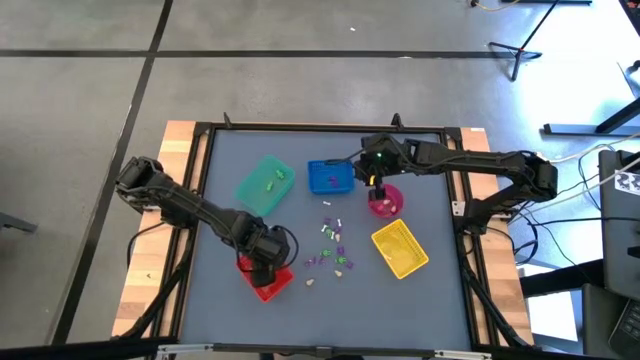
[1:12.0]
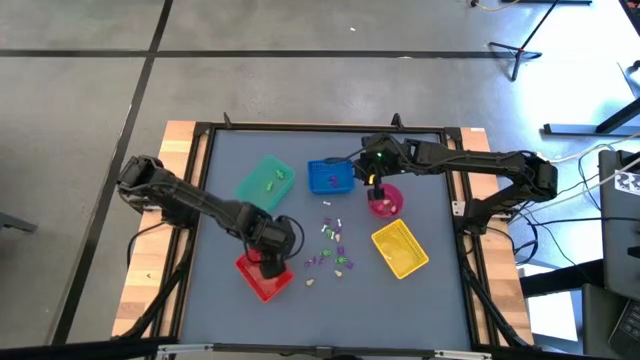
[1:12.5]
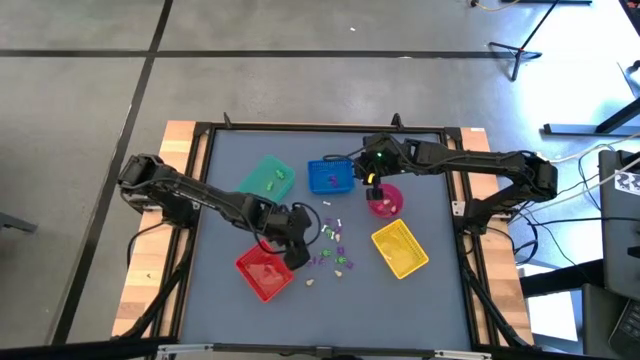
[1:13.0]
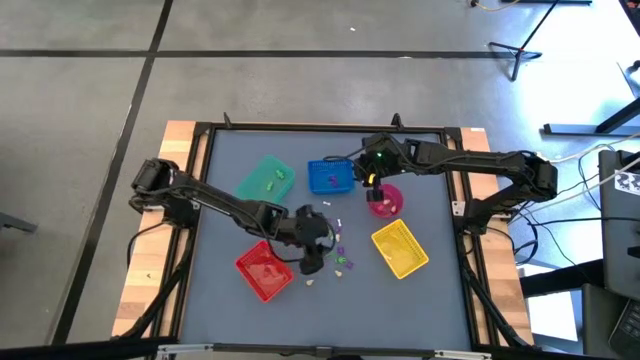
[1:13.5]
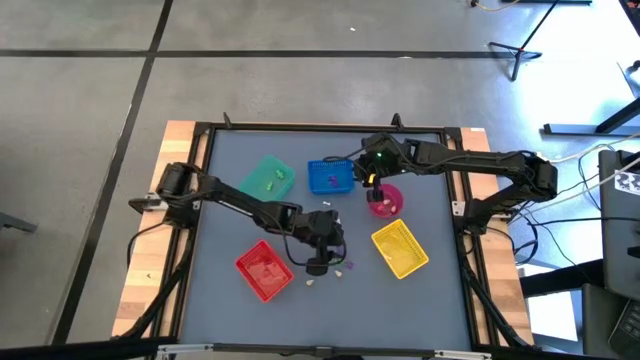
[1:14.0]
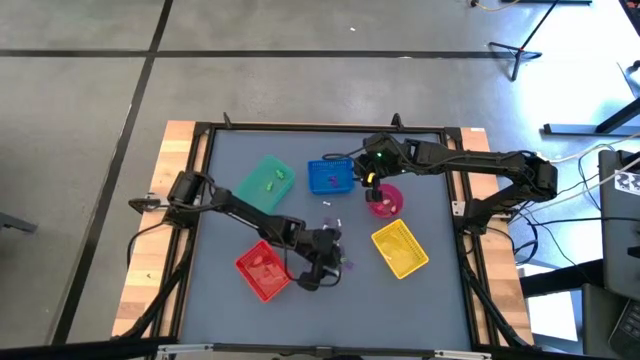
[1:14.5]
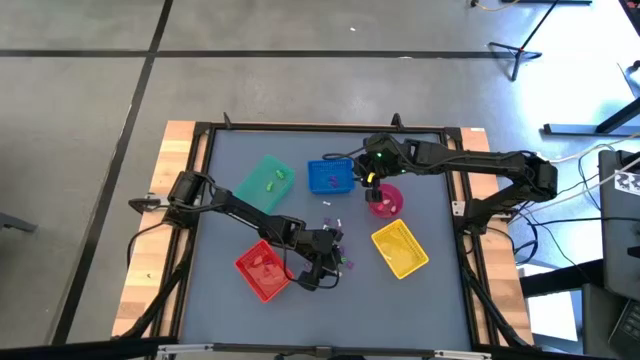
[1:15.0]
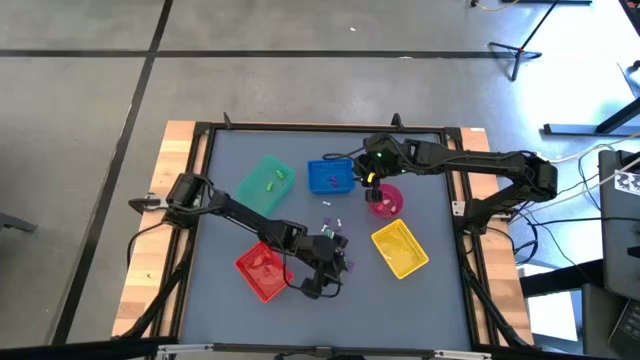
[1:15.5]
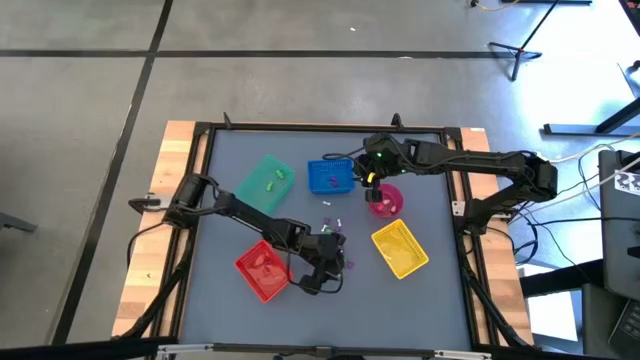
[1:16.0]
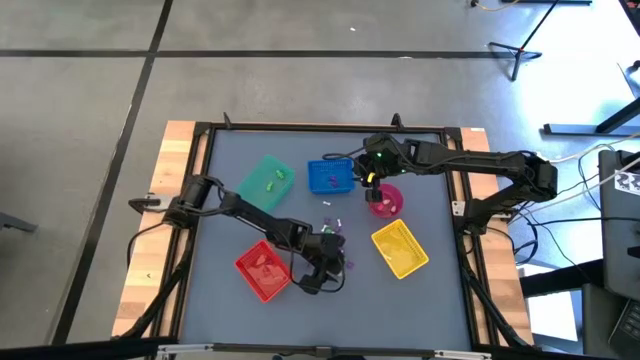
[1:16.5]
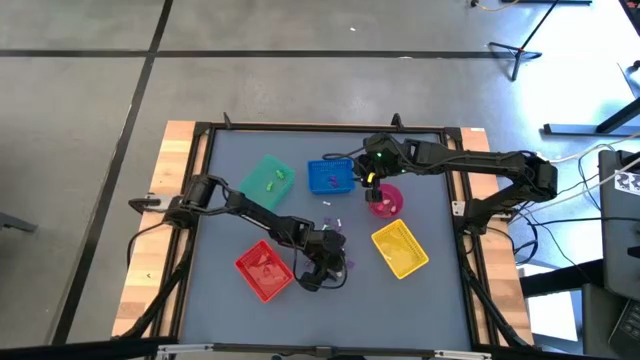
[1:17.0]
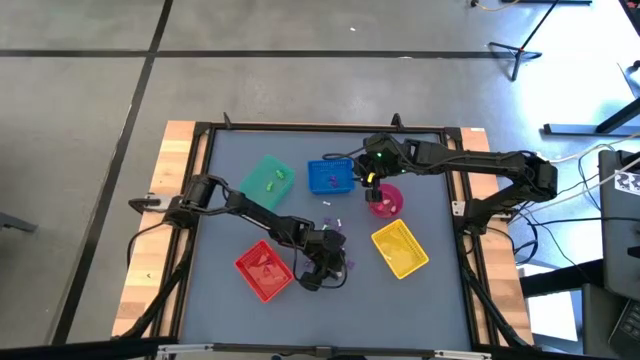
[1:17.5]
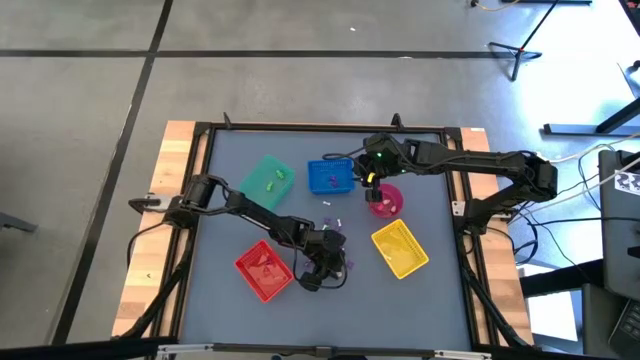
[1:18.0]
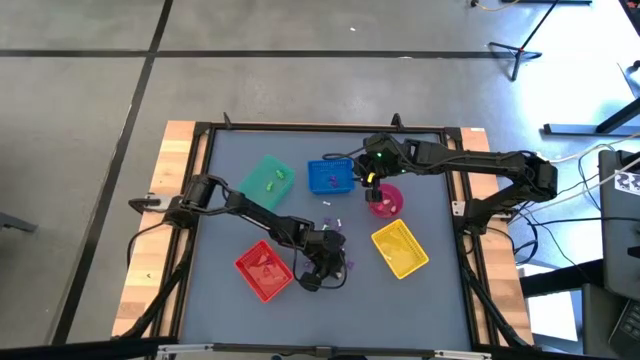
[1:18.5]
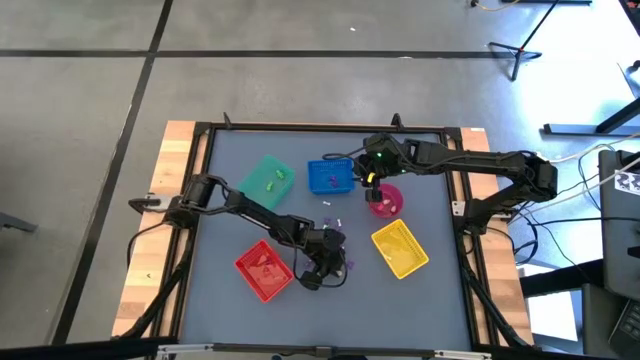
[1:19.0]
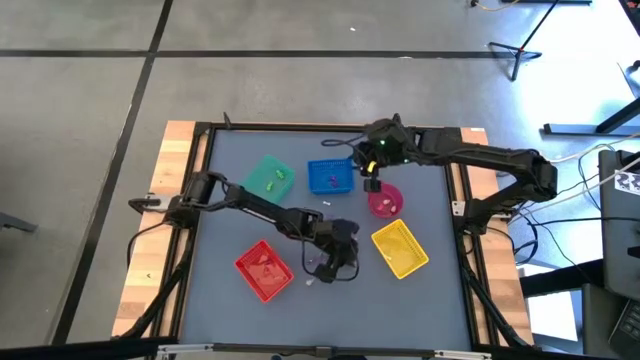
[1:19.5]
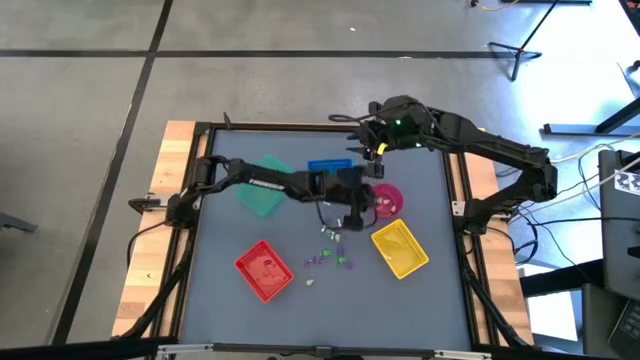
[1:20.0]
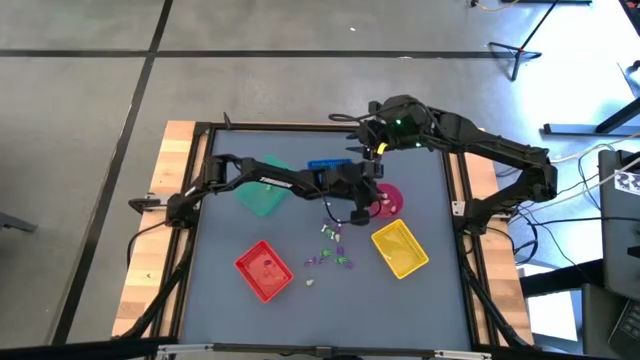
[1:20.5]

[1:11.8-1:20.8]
Task: Sort Halloween decoration
Put the yellow skull toy into the red bin

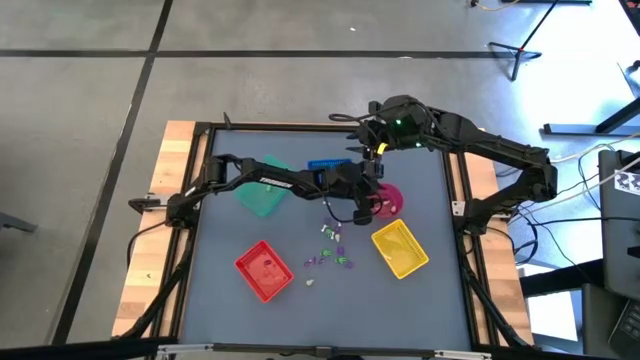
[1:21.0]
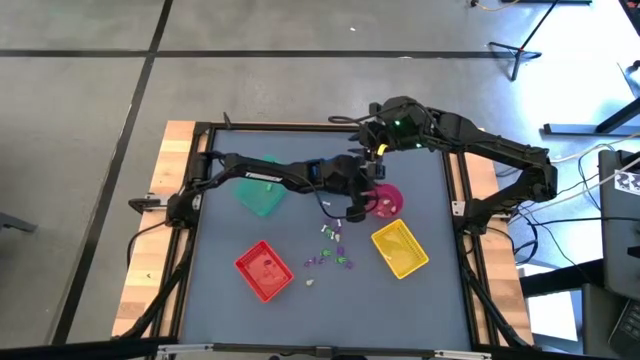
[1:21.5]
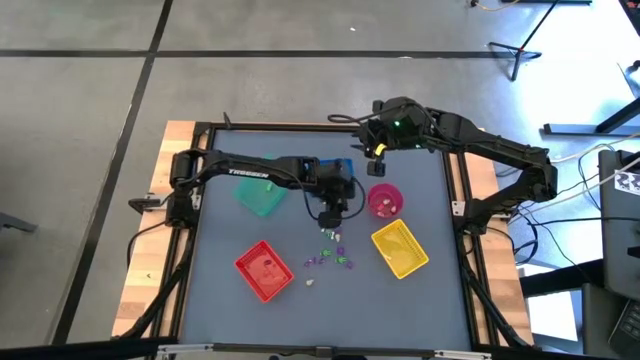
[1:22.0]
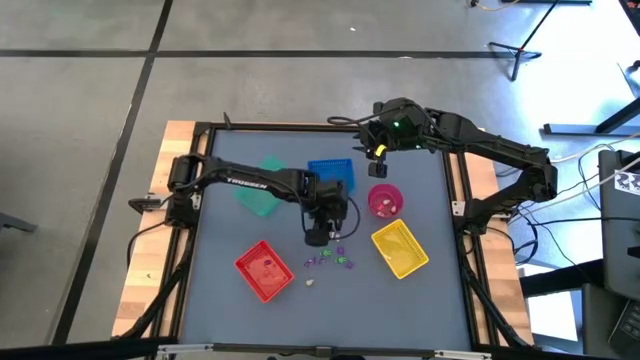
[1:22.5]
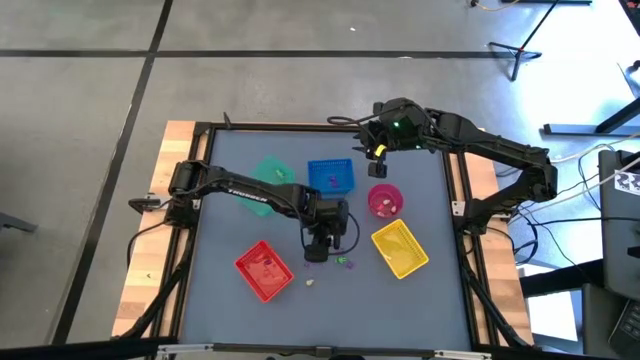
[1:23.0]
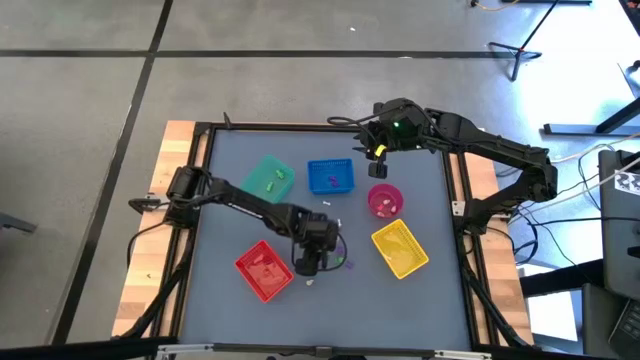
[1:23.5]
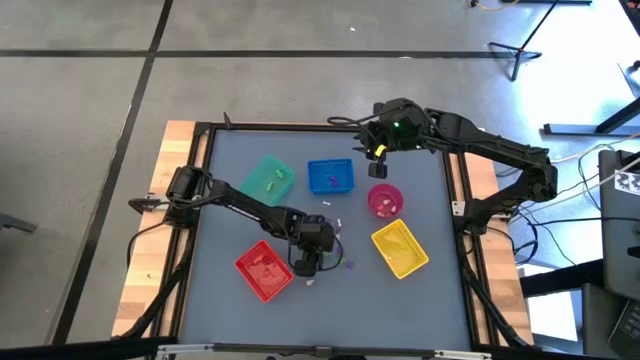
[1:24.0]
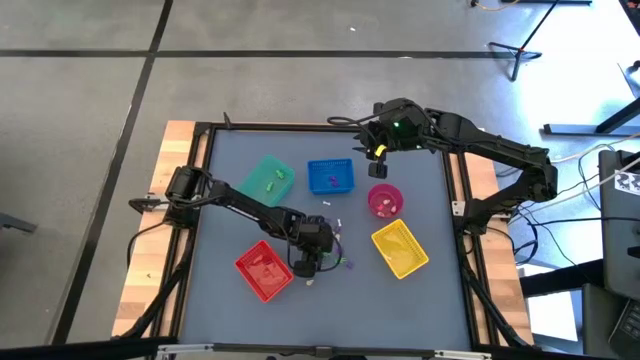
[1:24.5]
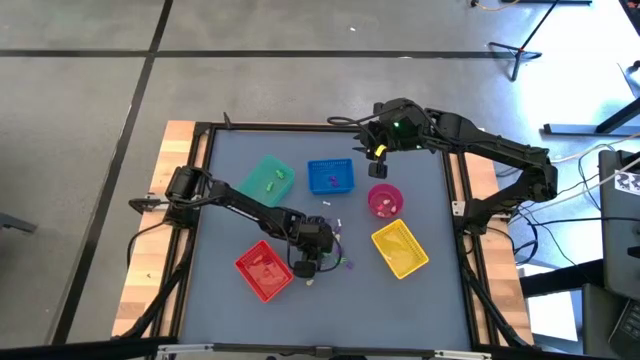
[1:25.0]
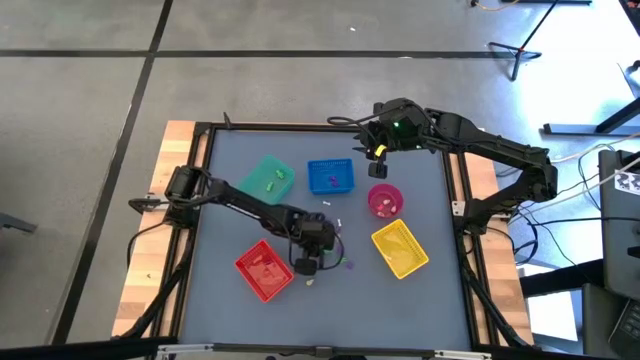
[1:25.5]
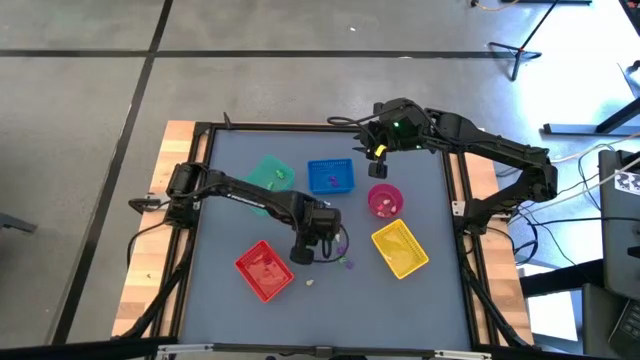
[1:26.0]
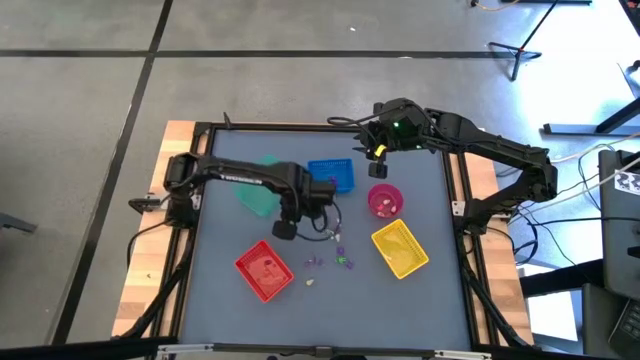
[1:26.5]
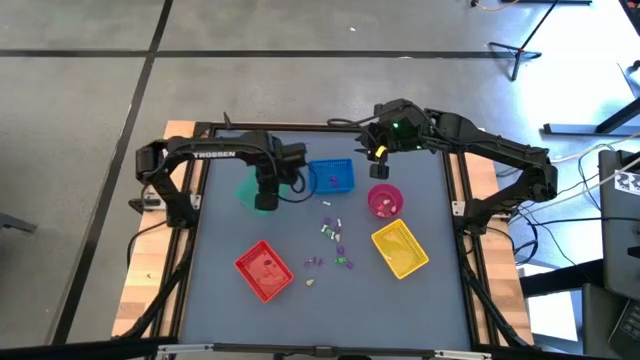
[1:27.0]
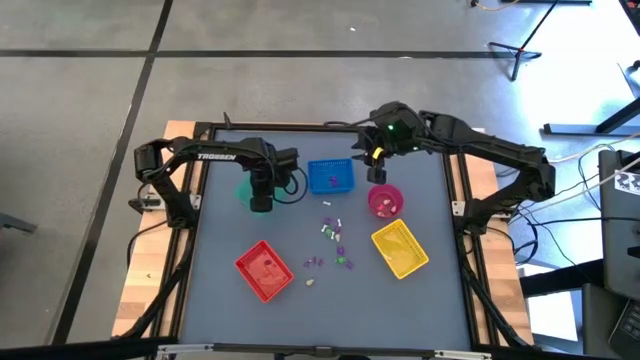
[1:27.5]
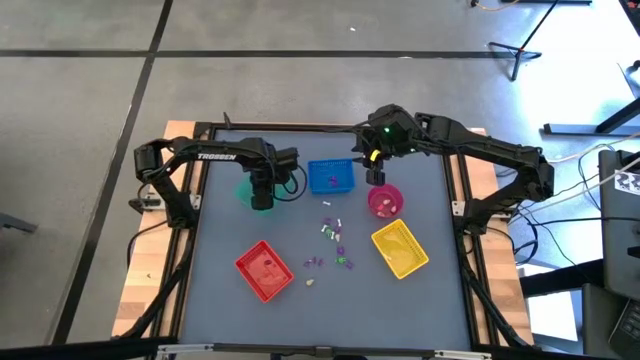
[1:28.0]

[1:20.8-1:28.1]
Put the green skeleton toy into the green bin

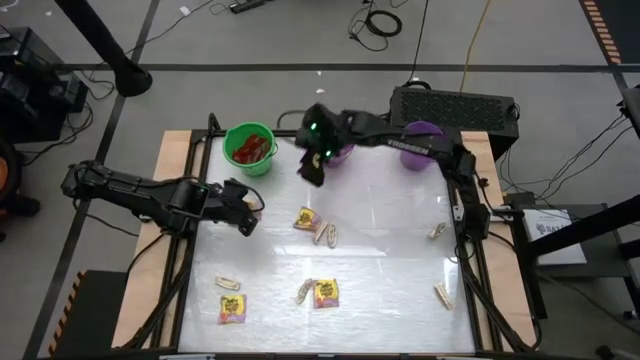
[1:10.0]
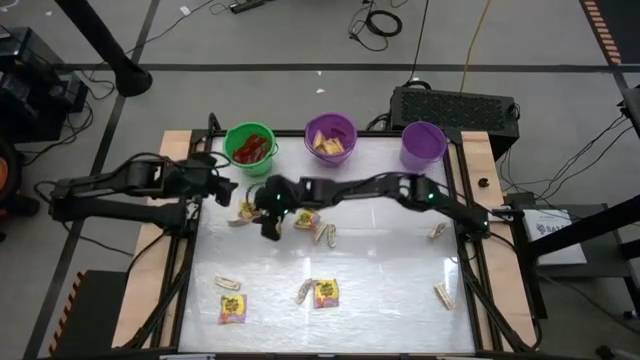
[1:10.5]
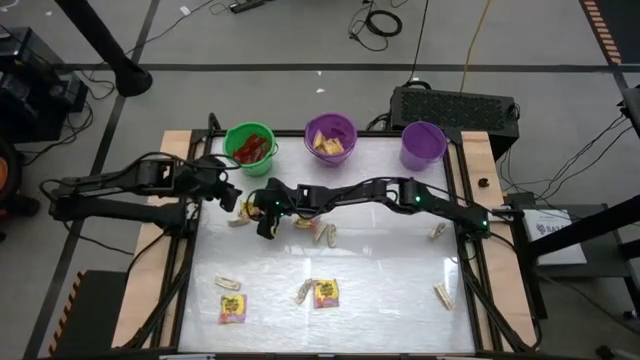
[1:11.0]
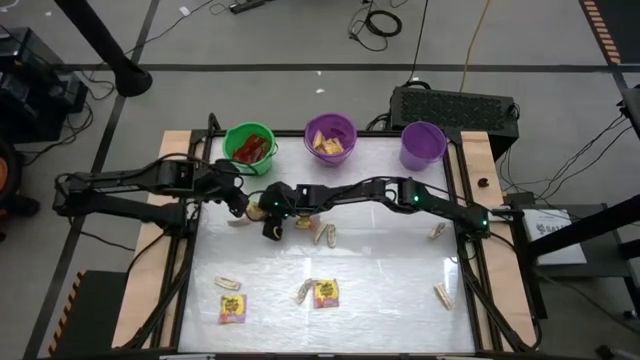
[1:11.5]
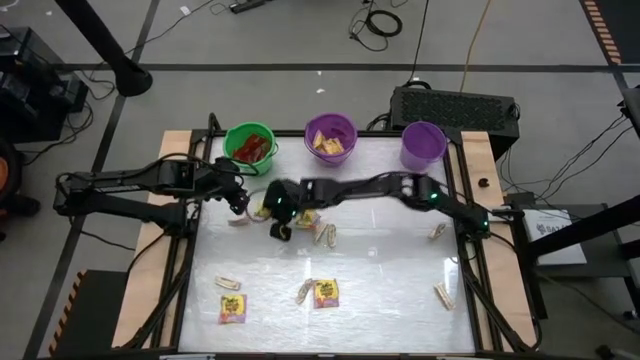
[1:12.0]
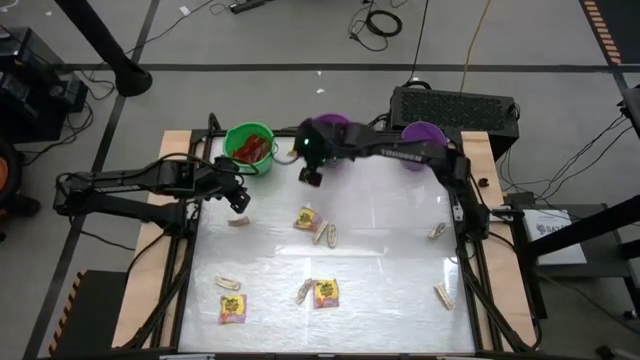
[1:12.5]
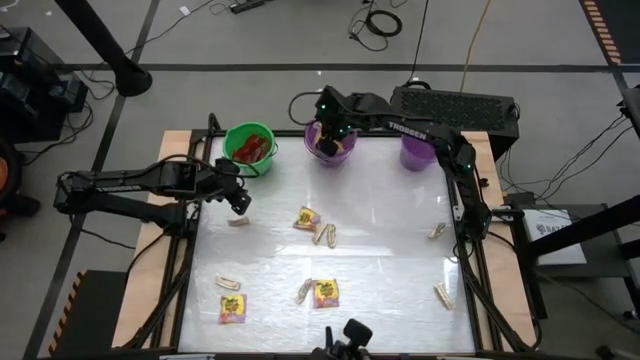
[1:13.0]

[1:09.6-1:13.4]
Task: Sort candy by brand, put in halloween buckets
Put the yellow candy pack in the left purple bucket

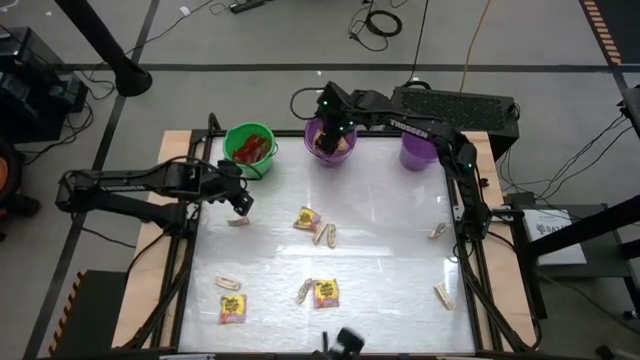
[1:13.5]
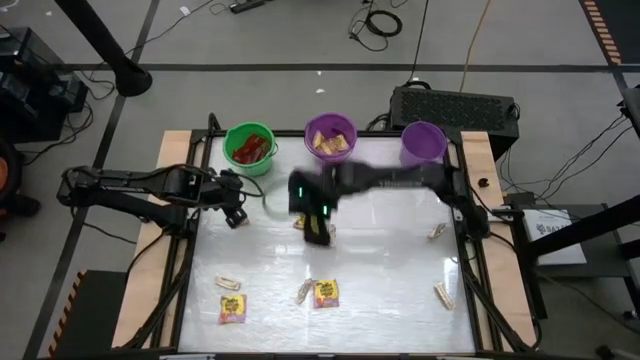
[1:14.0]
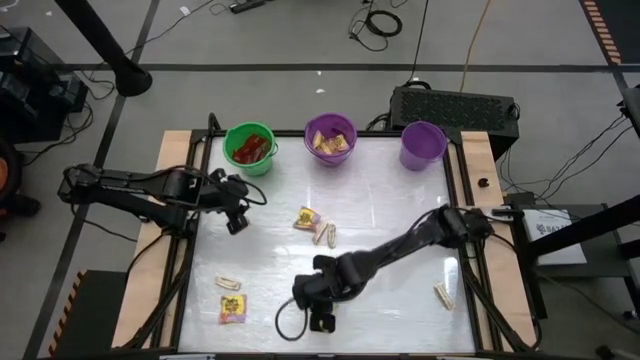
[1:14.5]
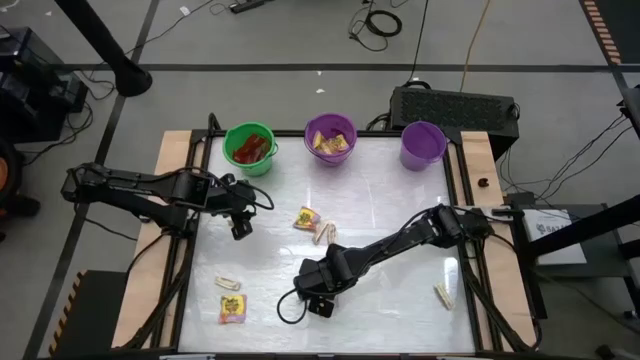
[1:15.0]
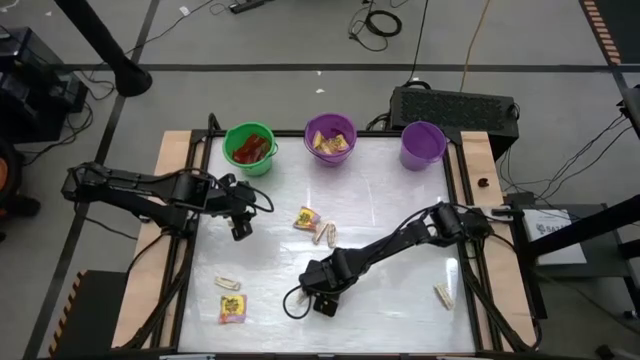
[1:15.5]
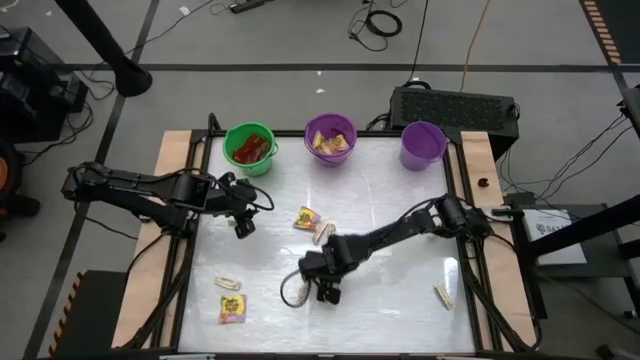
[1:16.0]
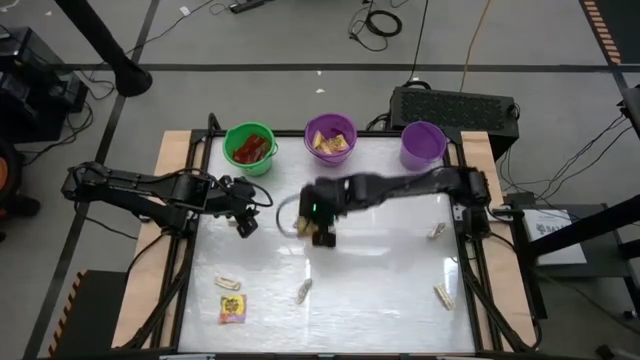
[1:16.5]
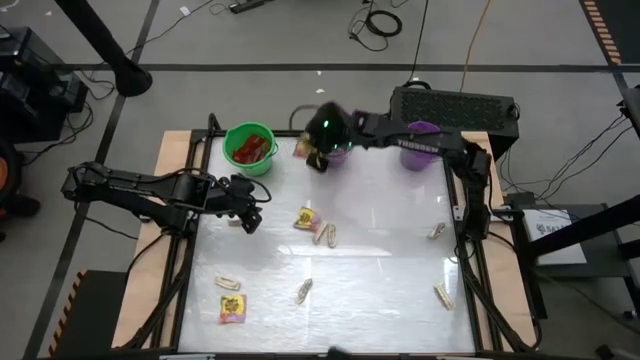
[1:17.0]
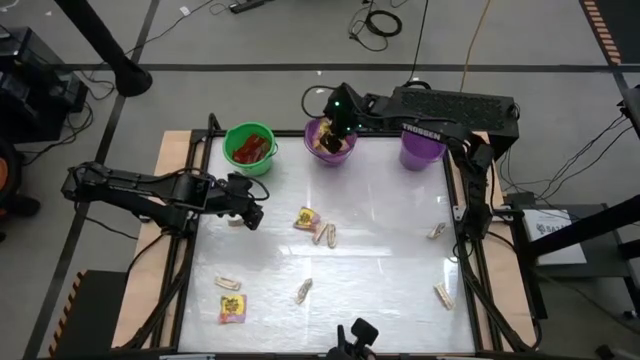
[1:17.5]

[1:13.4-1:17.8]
Put the yellow candy pack in the left purple bucket
